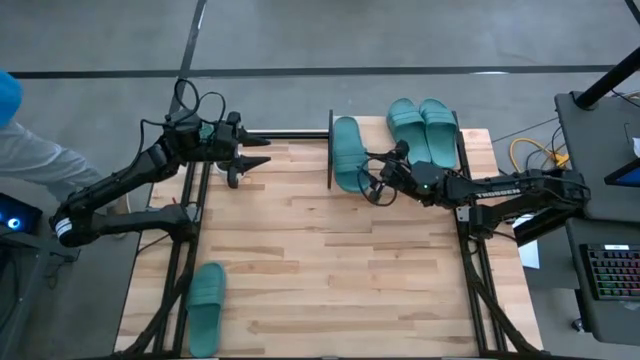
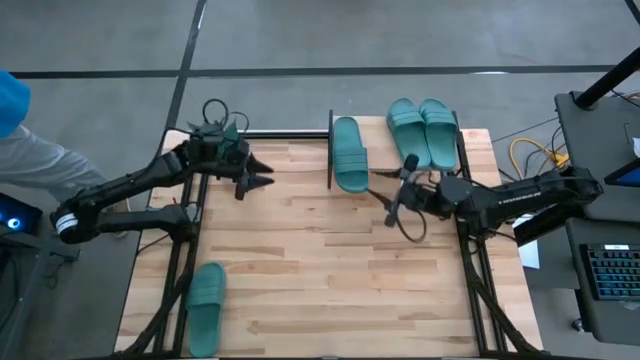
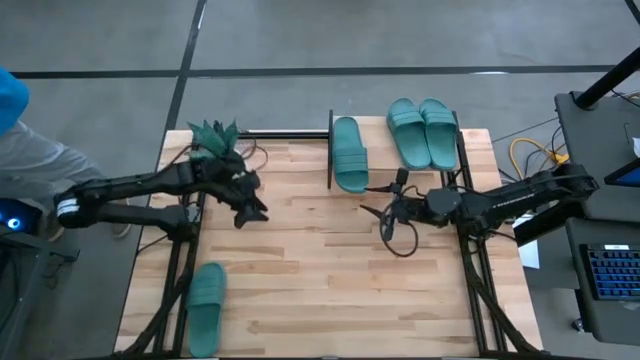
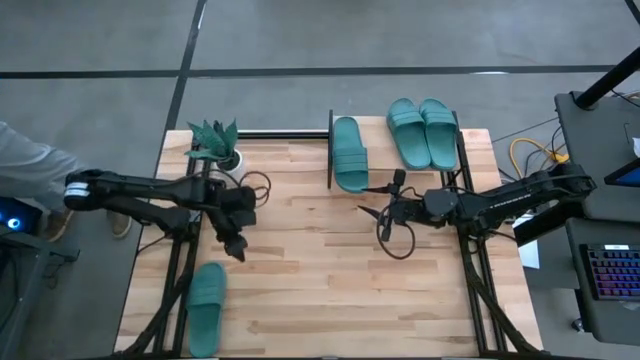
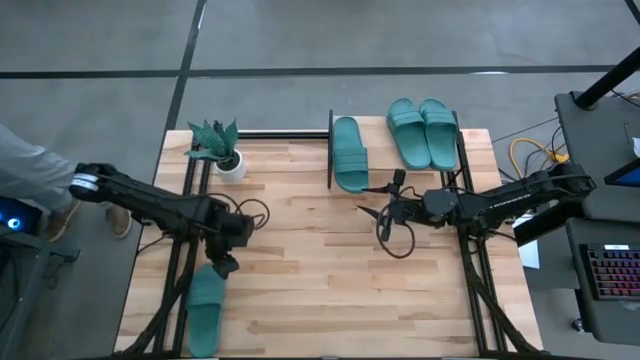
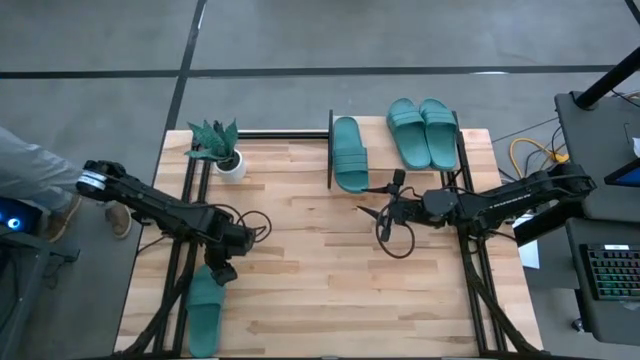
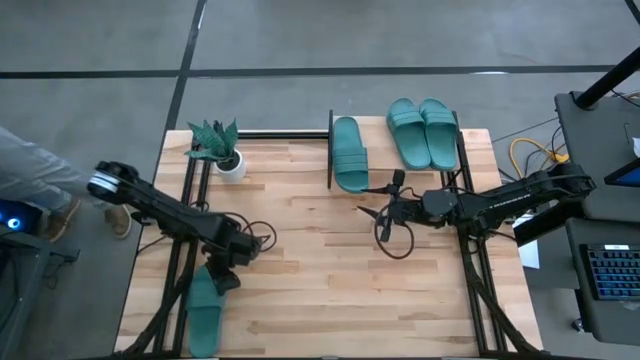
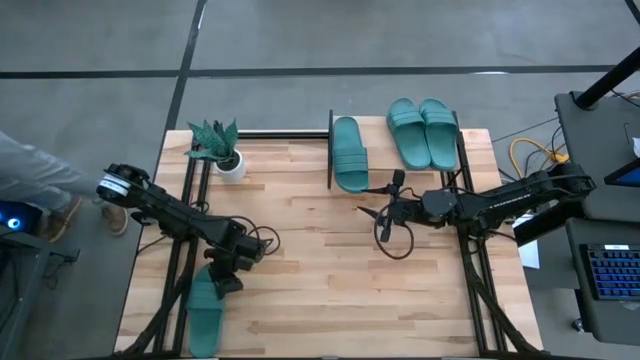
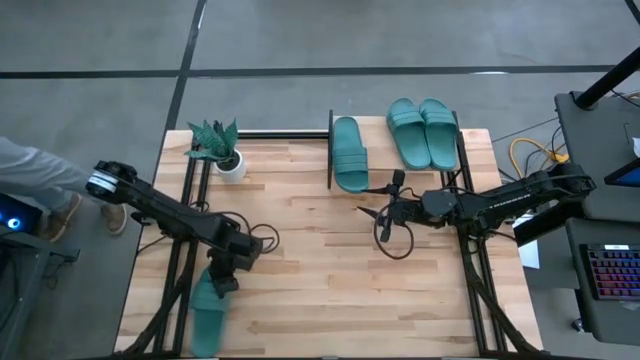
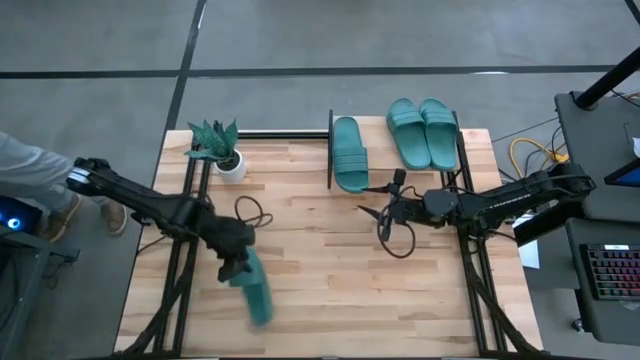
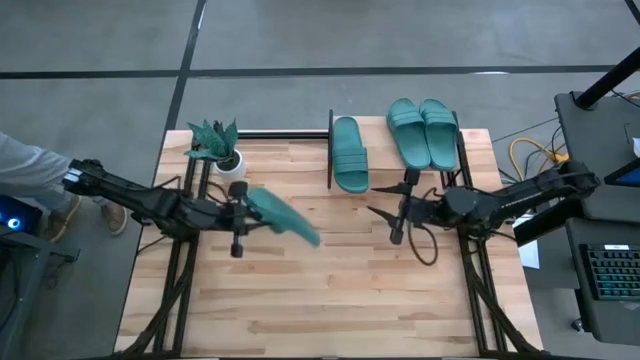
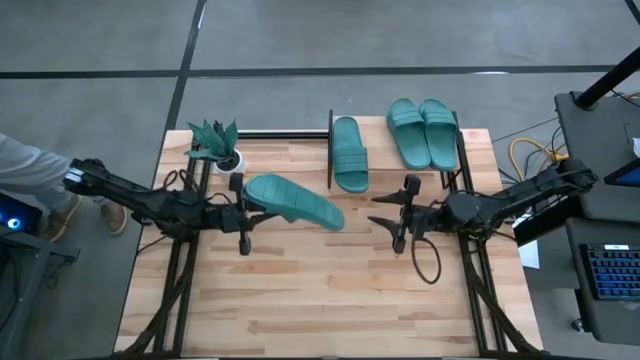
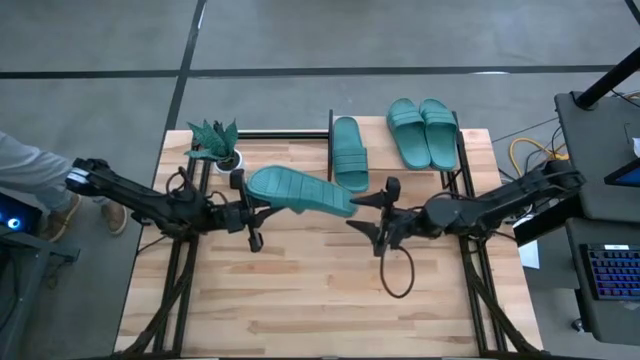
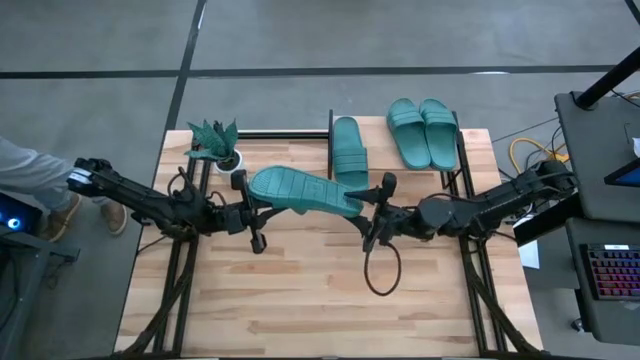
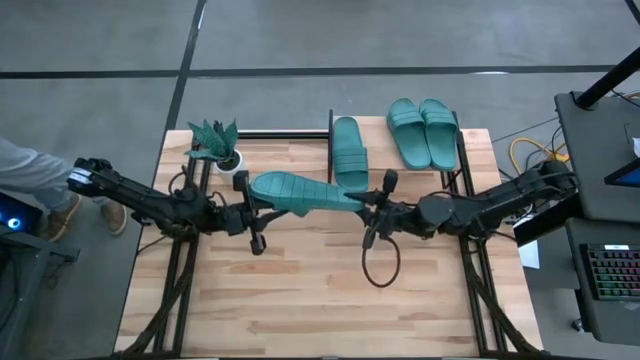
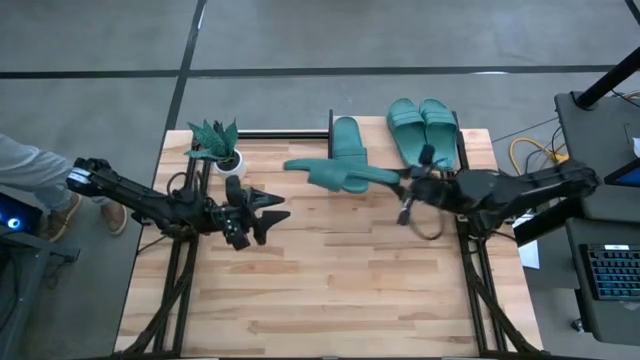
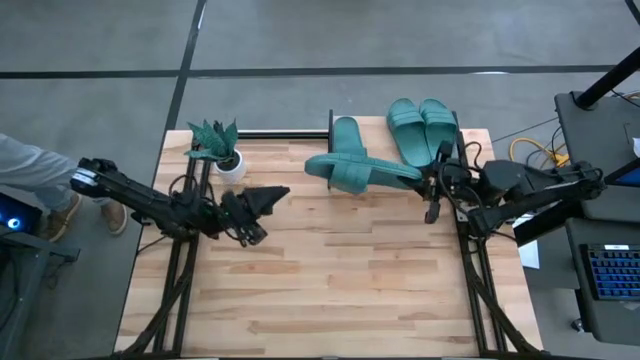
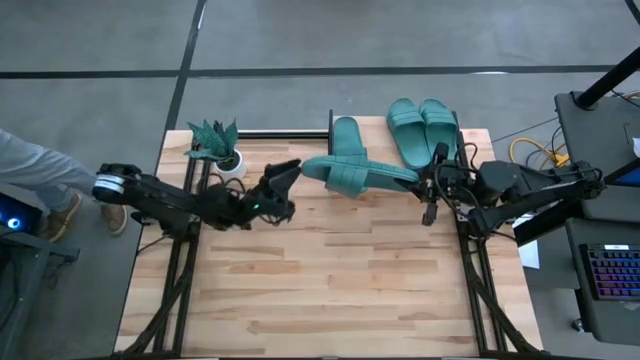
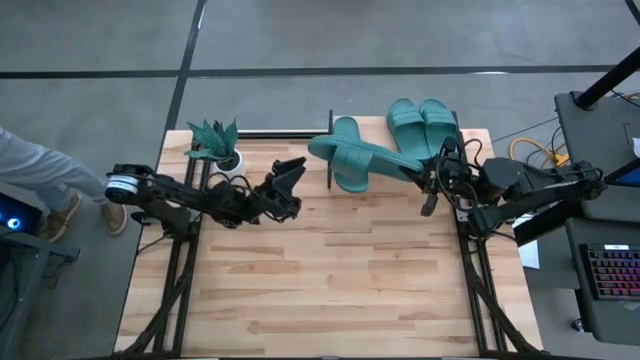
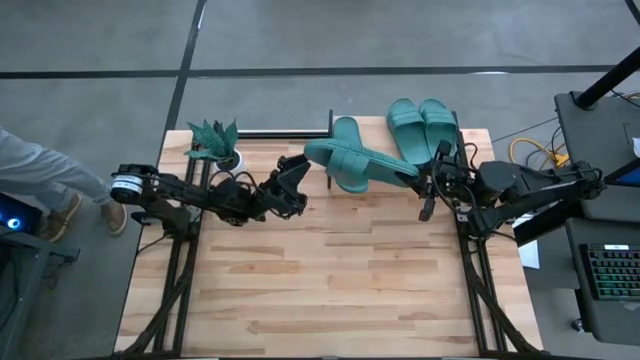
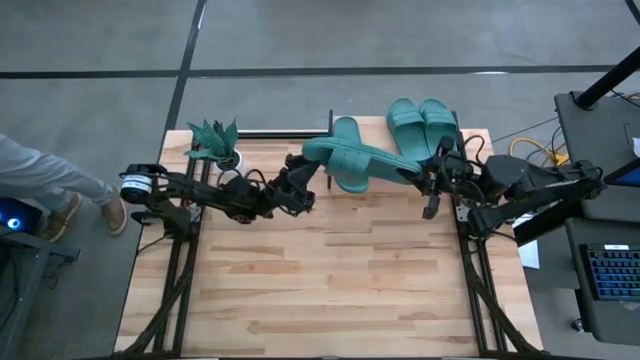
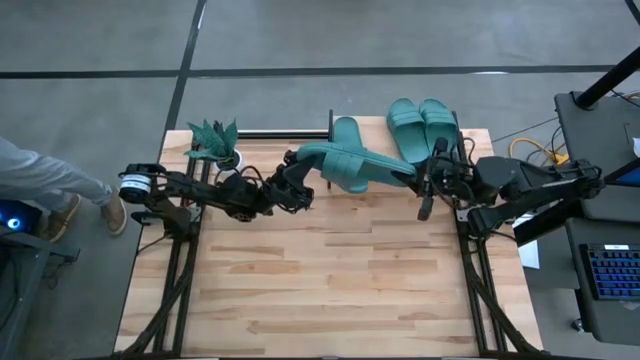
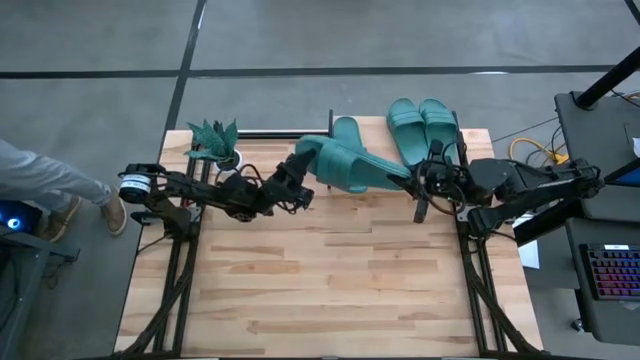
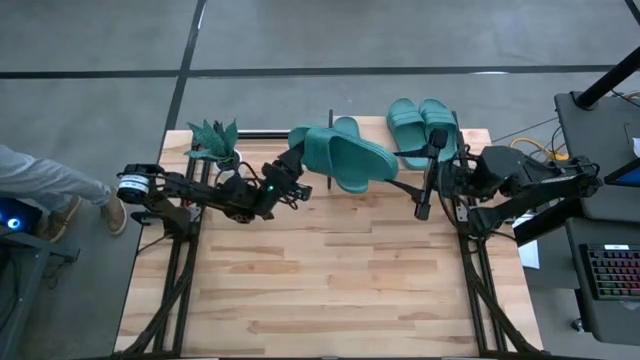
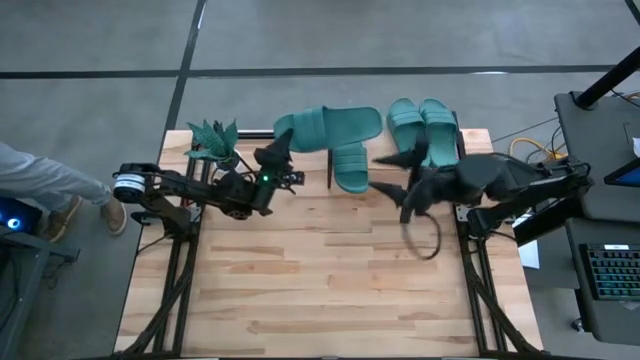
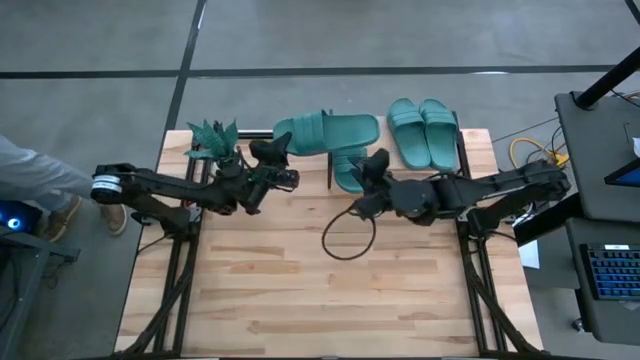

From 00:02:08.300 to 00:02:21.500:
Task: Pick and place slides into the shelf
Put the green slipper on the shelf

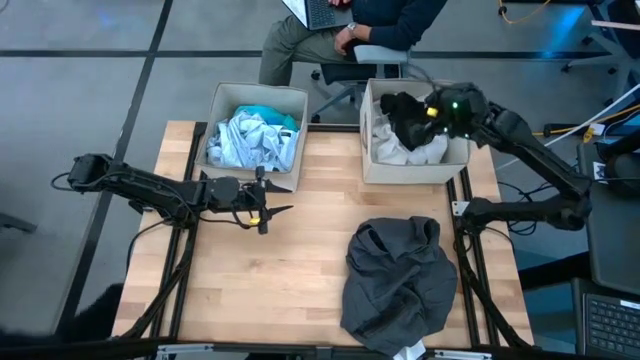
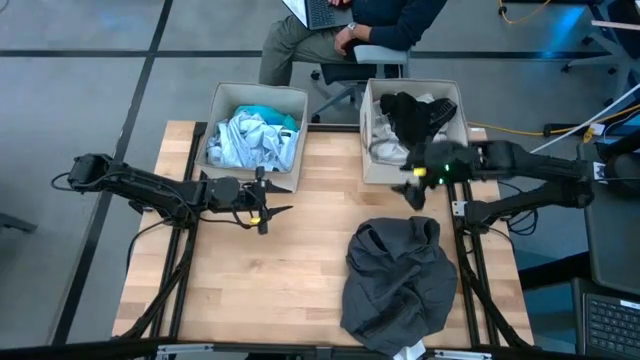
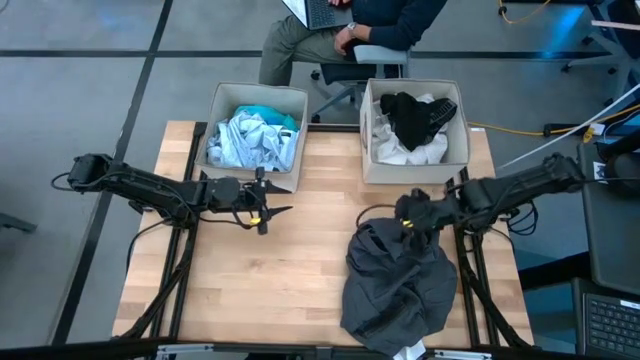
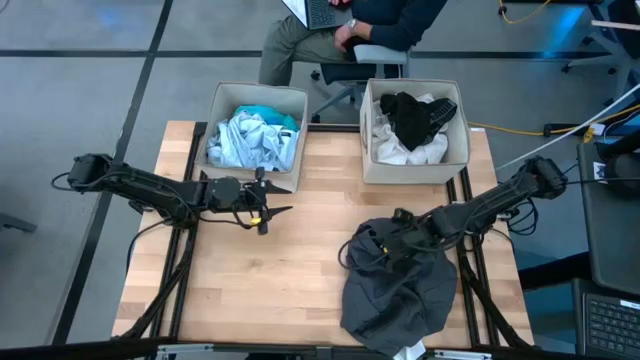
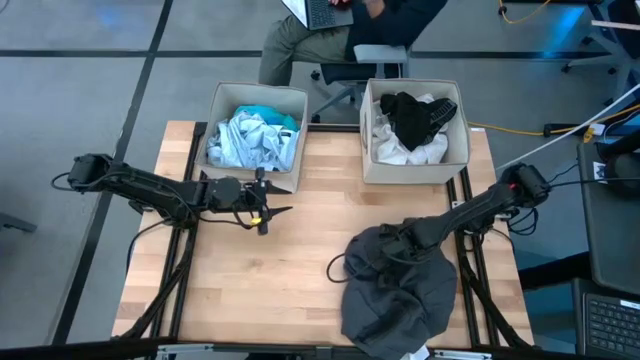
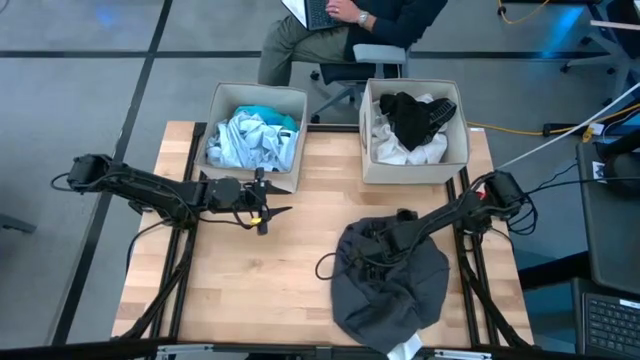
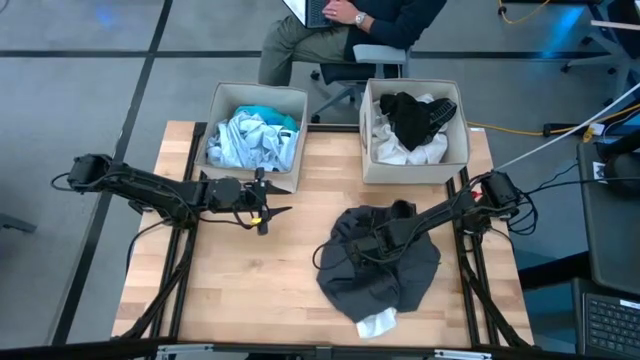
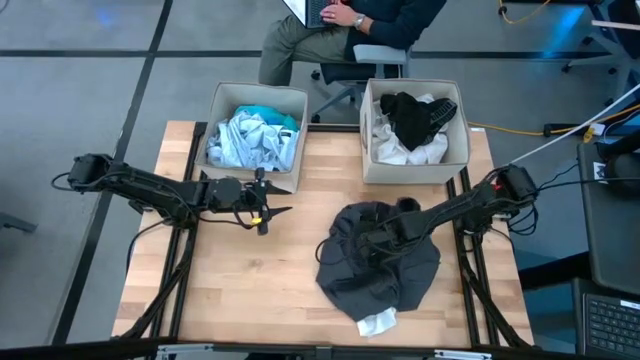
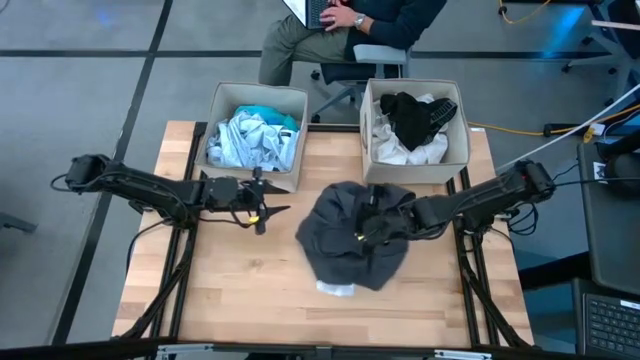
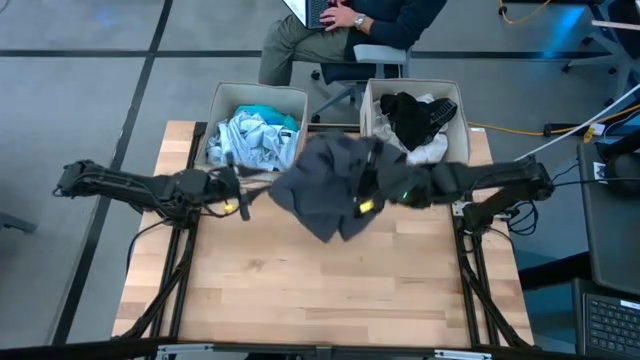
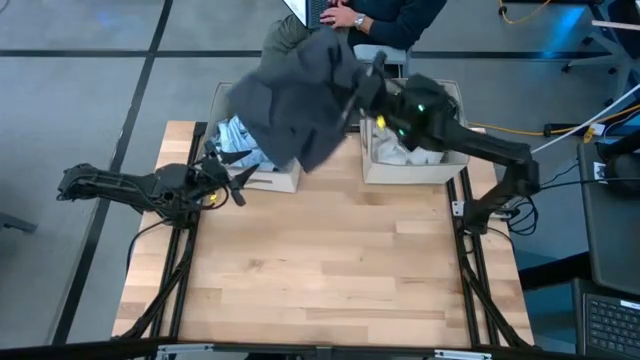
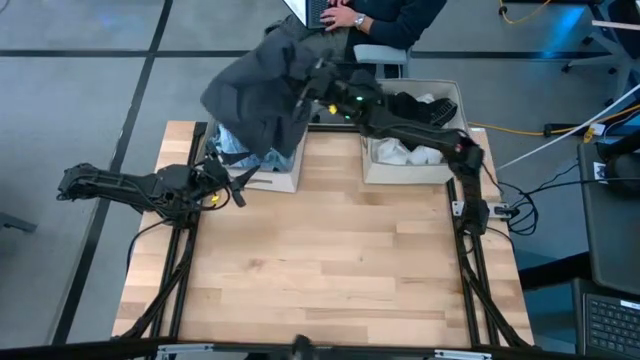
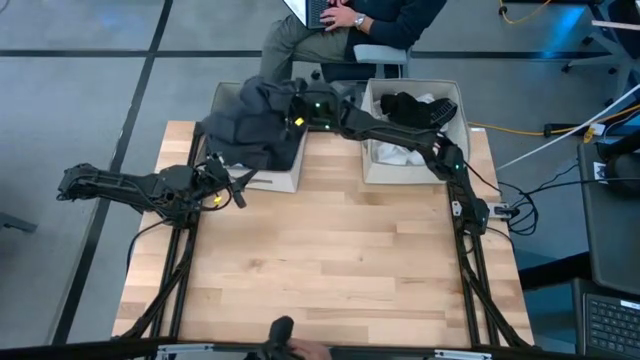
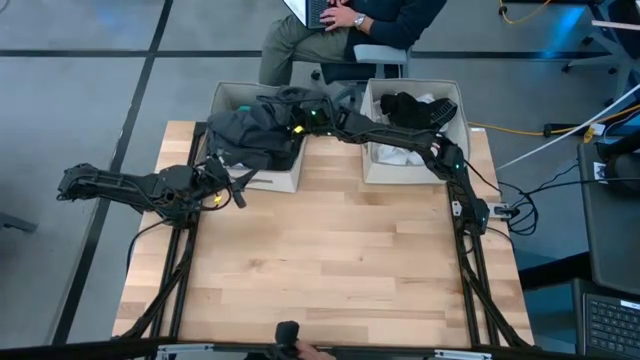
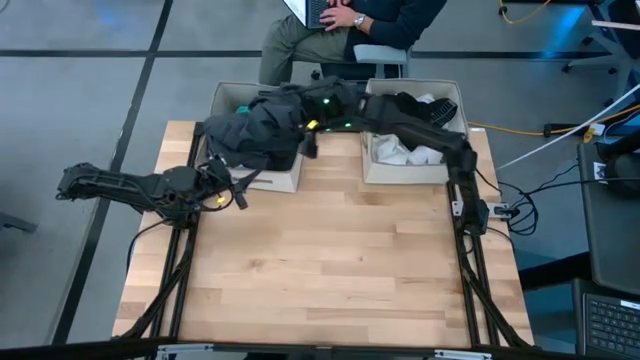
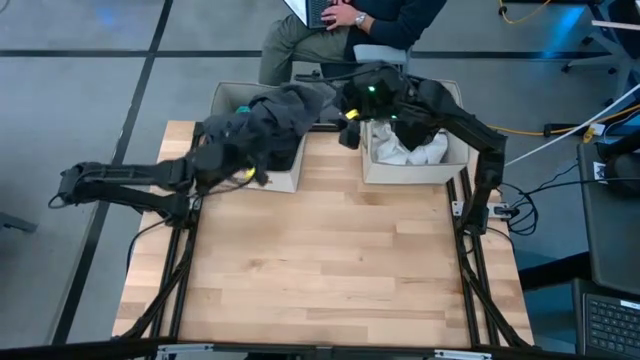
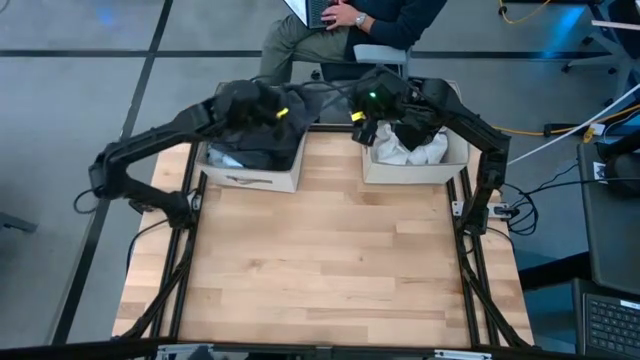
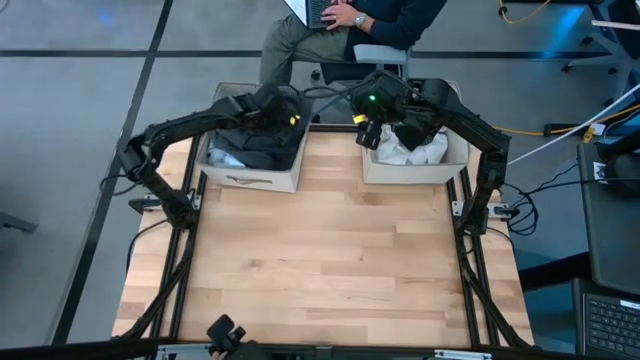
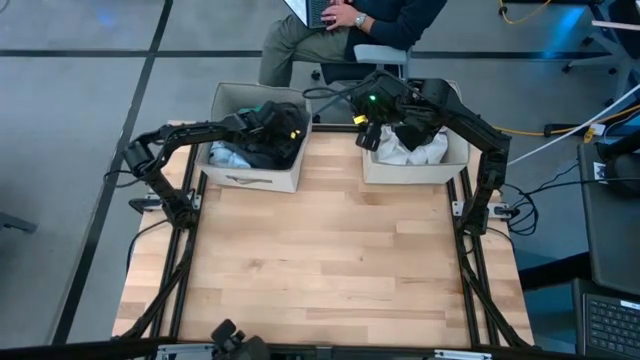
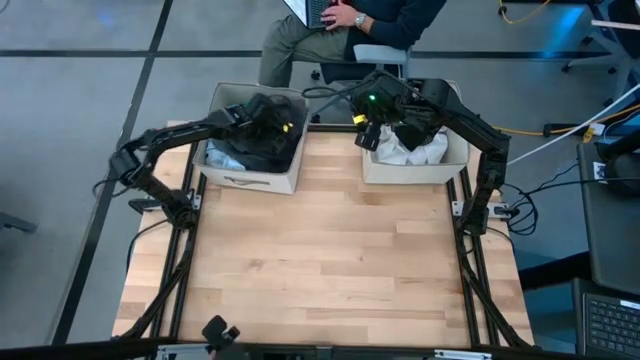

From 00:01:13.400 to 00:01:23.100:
Task: Sort clothes
Put the gray shorts into the left laundry organizer
